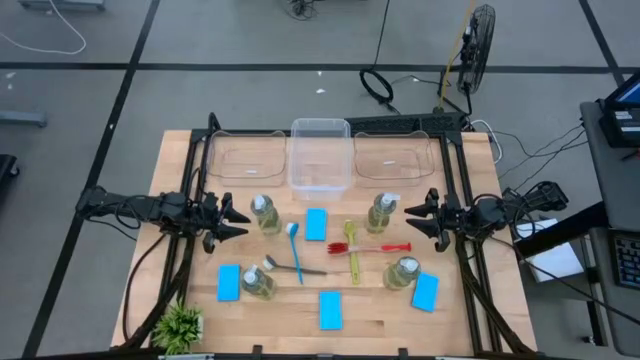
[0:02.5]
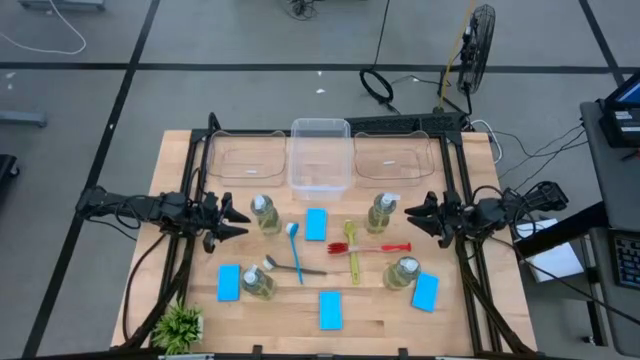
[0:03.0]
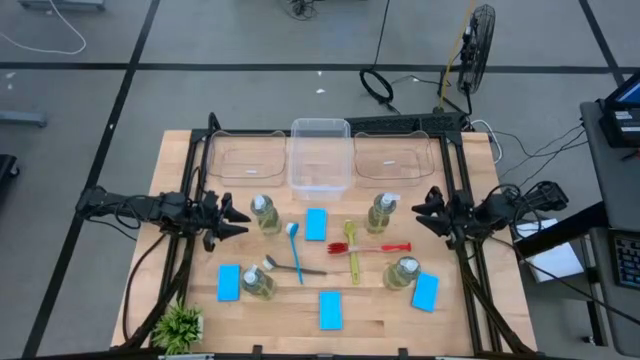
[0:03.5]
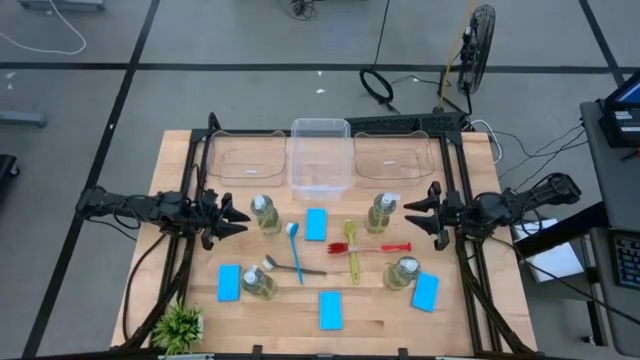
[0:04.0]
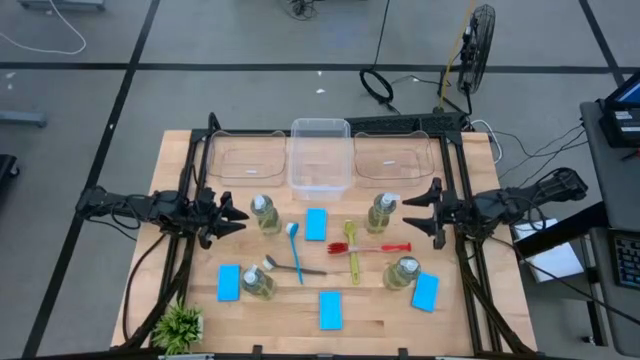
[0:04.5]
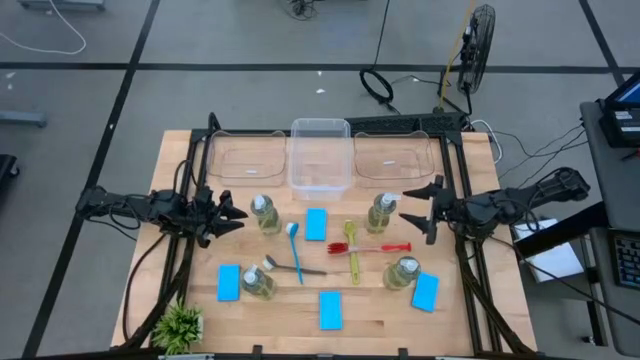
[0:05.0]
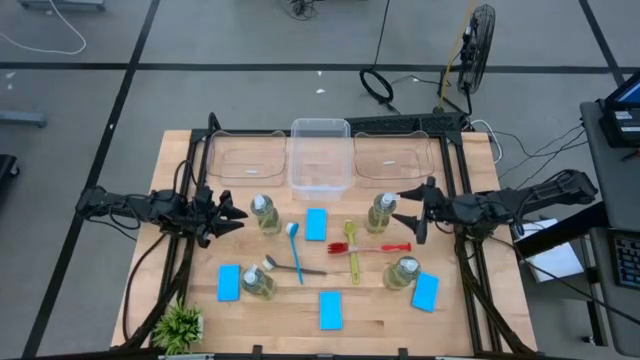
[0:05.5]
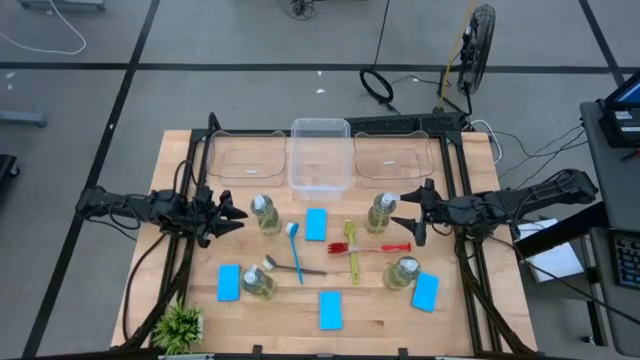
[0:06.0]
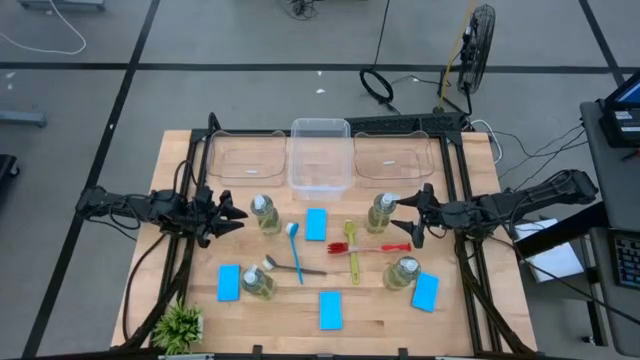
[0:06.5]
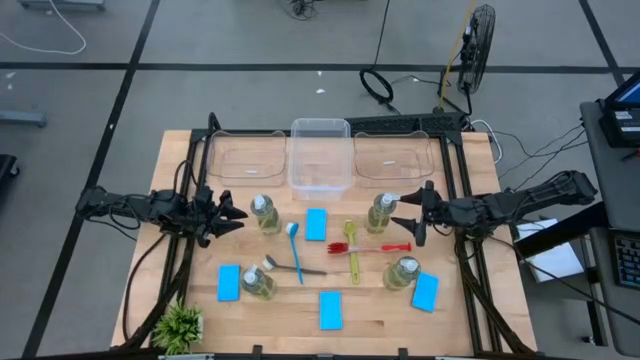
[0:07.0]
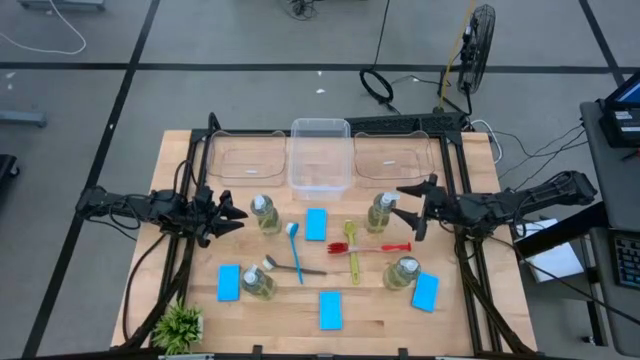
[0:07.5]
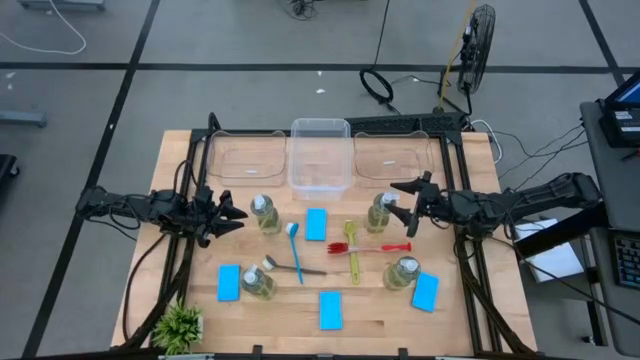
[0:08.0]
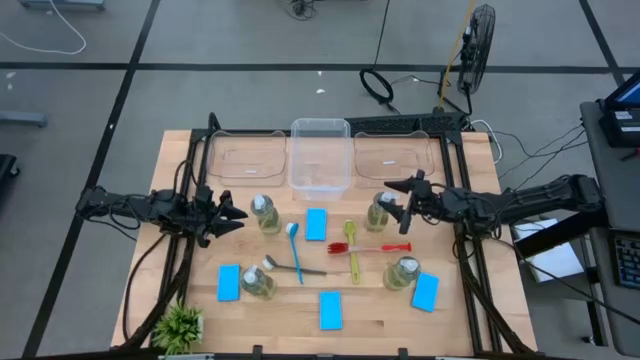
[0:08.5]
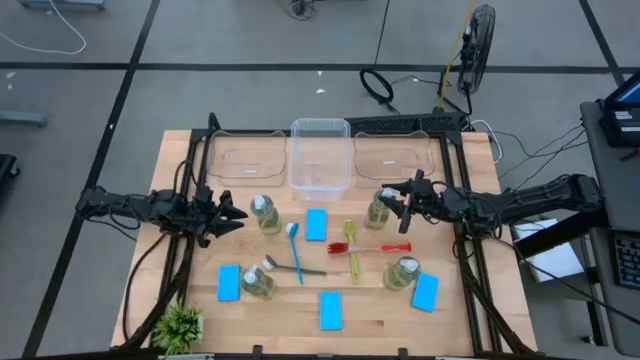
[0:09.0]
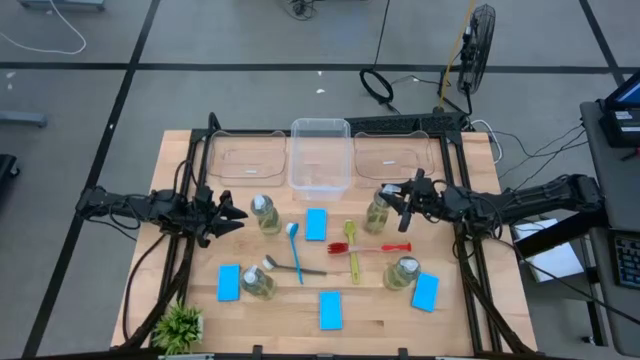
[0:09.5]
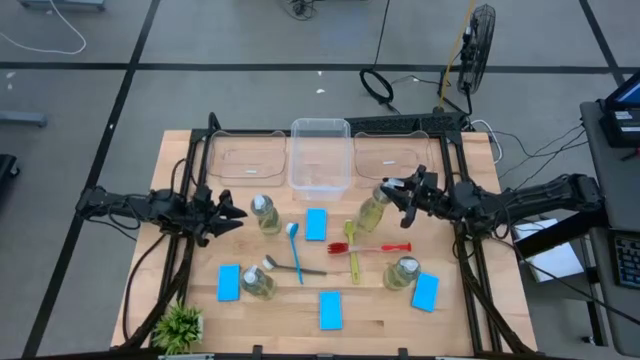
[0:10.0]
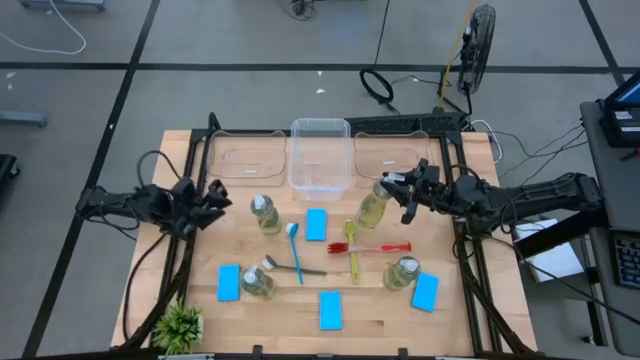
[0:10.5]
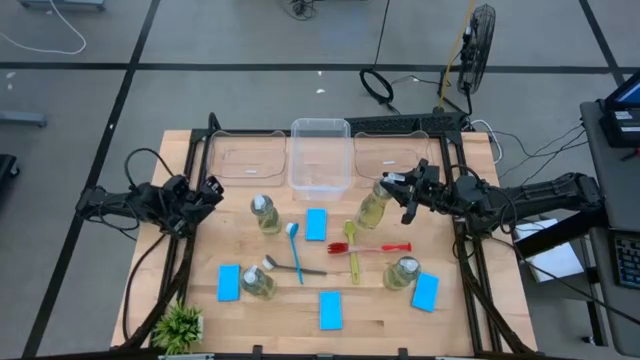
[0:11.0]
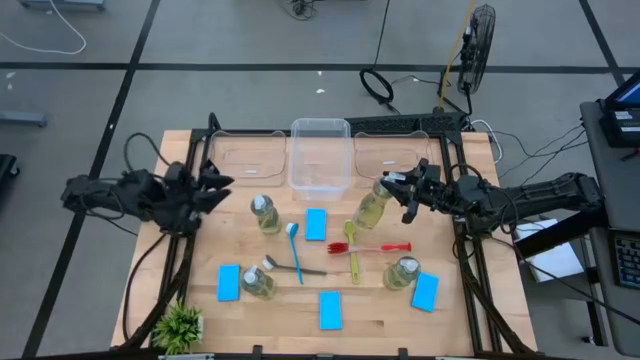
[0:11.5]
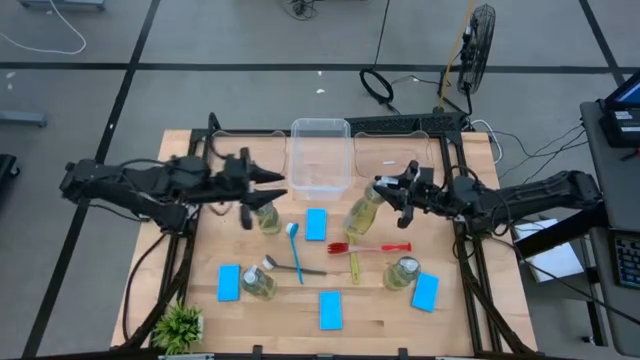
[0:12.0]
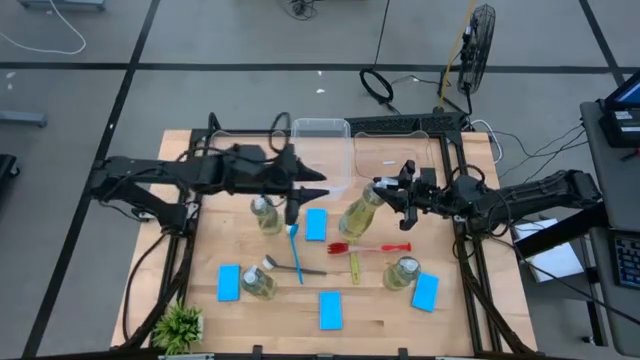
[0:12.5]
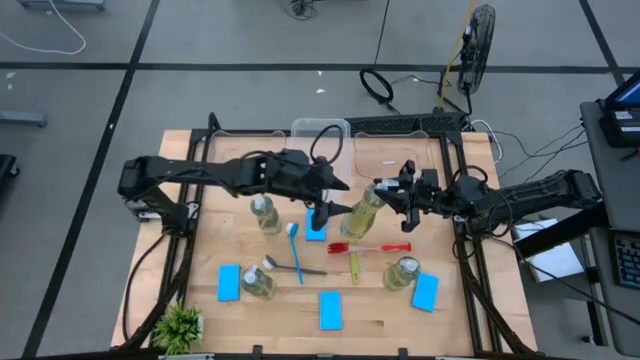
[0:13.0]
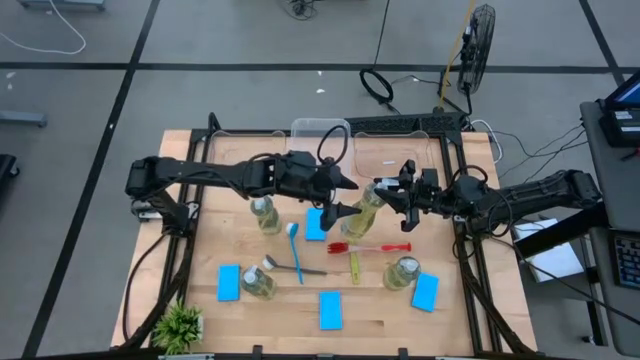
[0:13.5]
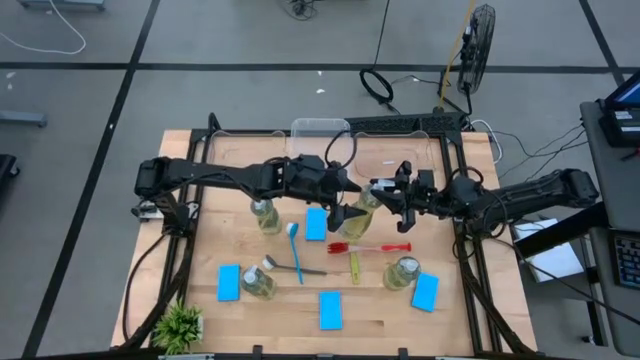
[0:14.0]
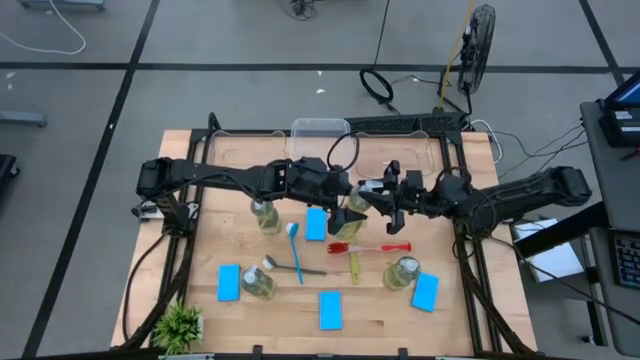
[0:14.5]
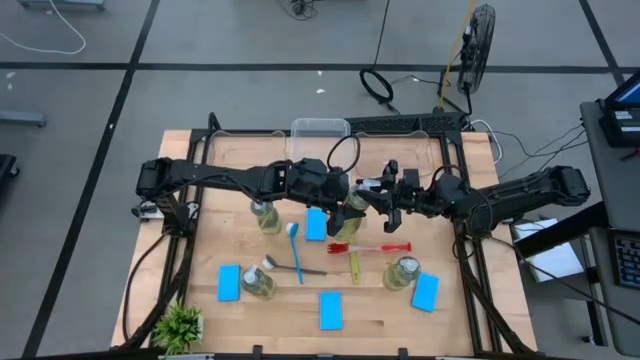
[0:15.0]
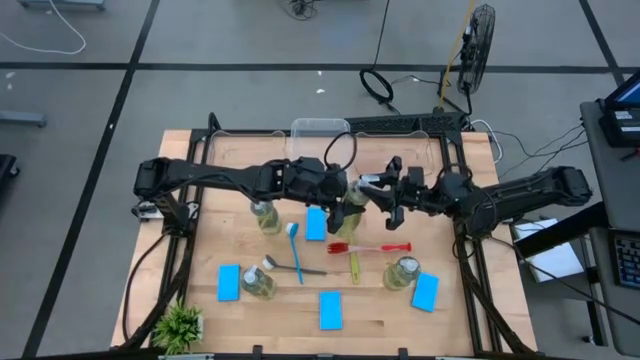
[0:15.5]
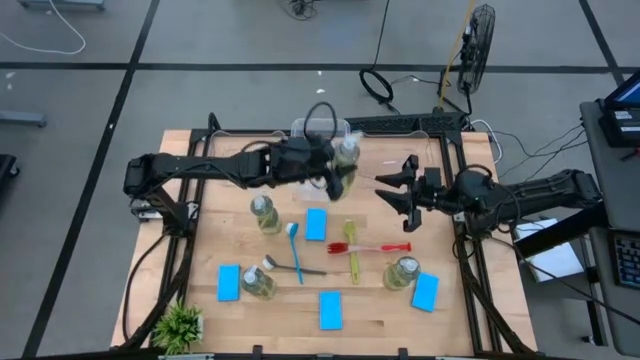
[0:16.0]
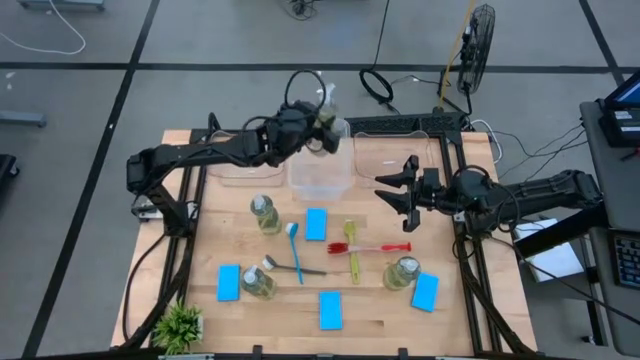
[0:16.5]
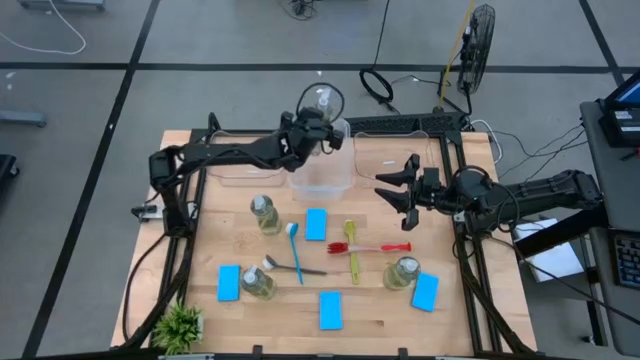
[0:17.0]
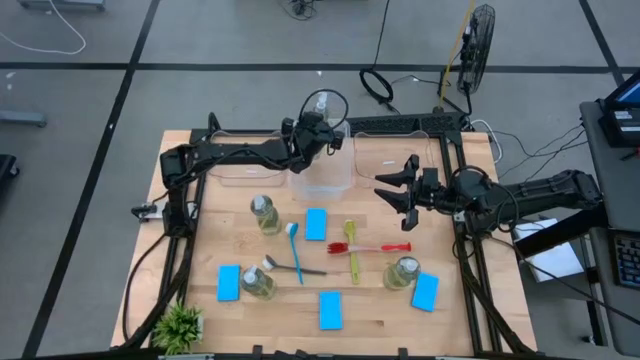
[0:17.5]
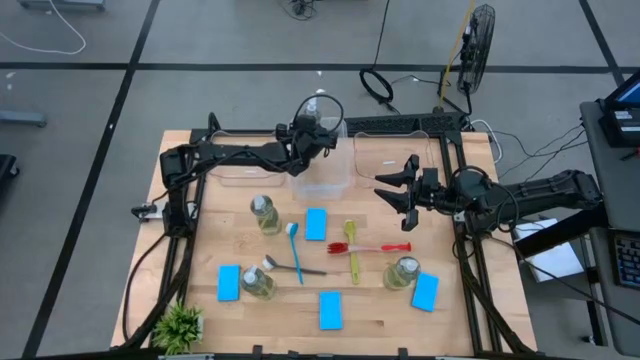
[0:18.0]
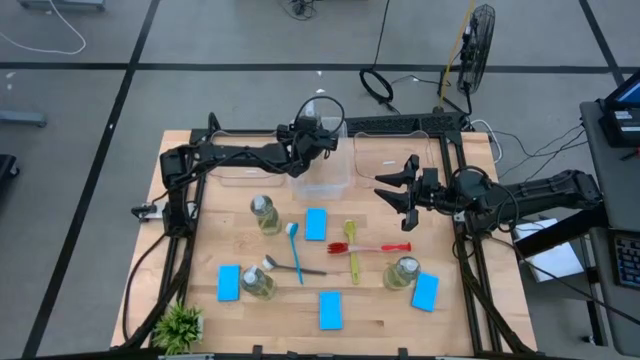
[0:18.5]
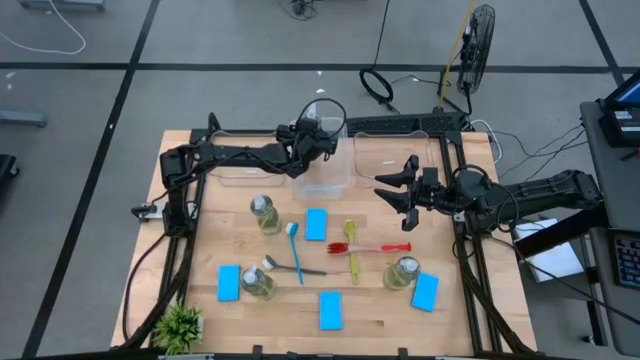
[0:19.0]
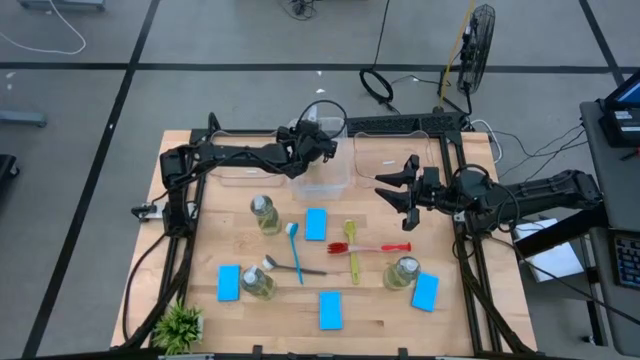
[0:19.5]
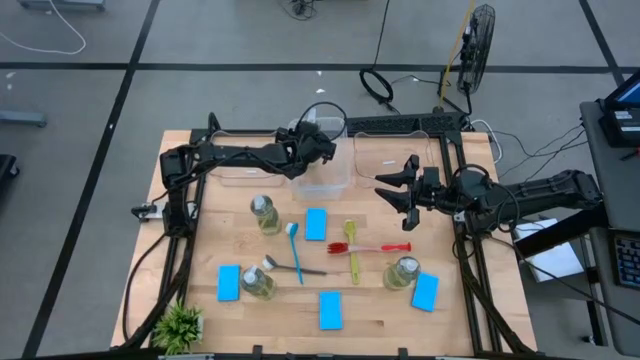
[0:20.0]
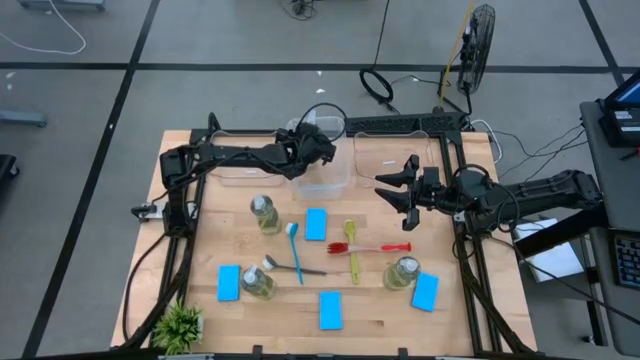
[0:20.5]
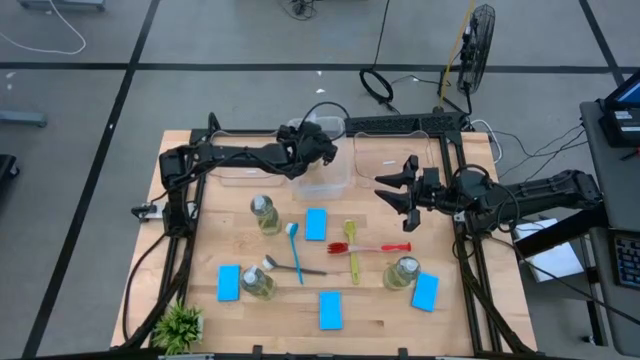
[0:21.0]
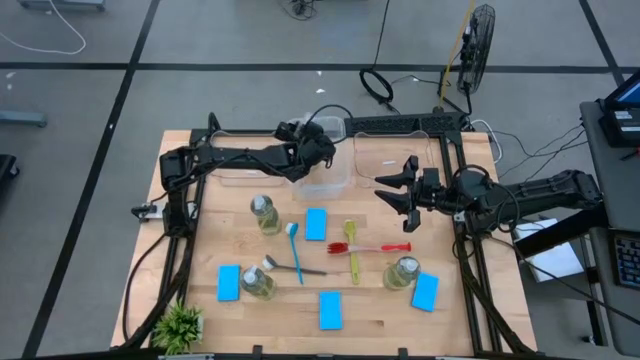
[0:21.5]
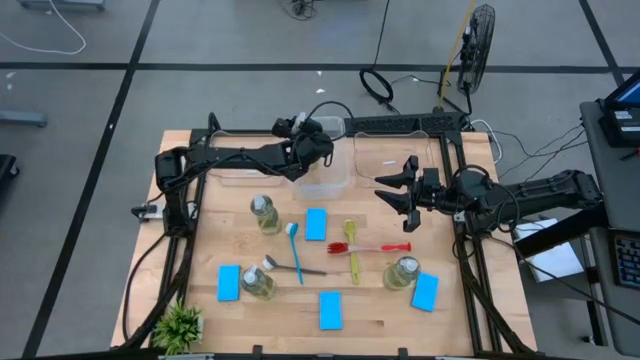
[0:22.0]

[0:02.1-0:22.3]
Task: Pick & Place Kitchen Sink Supplies
Put the yellow dish soap into the white bin
